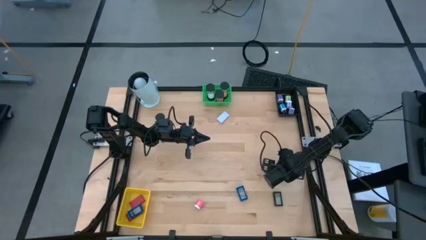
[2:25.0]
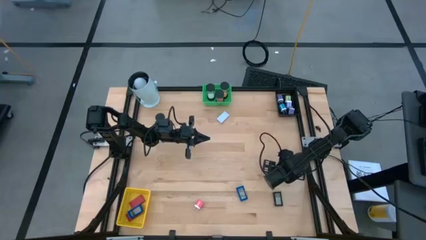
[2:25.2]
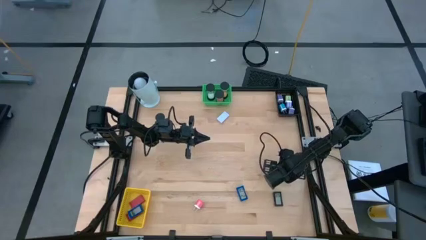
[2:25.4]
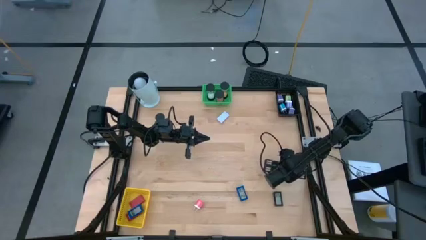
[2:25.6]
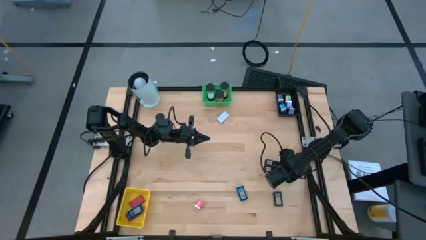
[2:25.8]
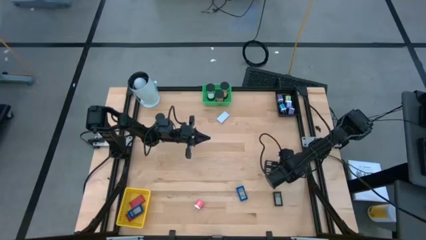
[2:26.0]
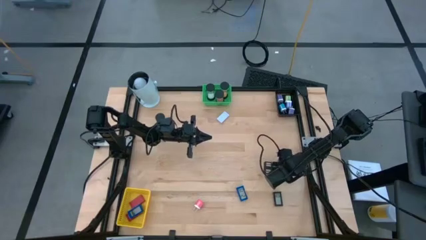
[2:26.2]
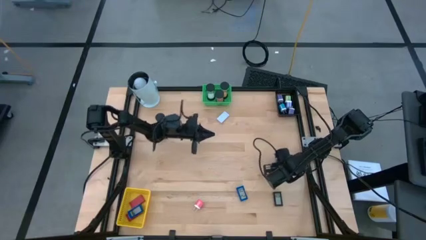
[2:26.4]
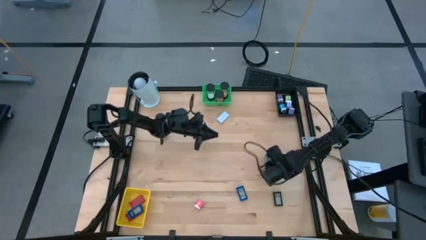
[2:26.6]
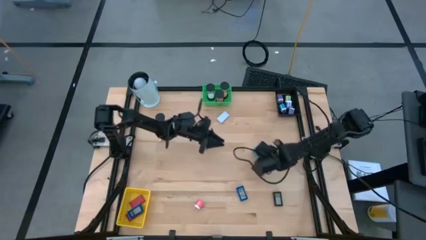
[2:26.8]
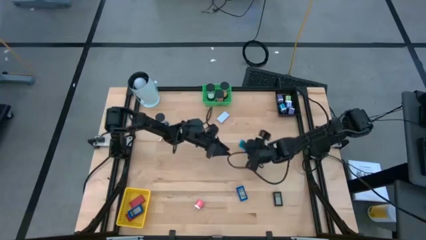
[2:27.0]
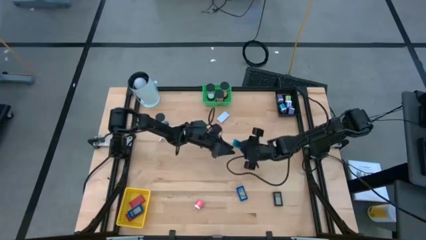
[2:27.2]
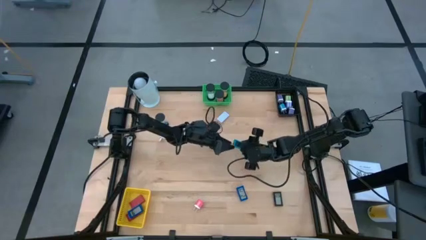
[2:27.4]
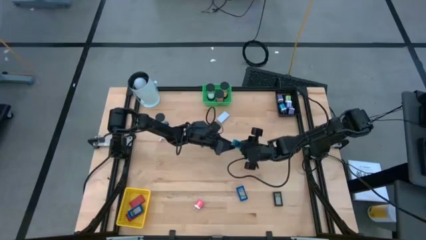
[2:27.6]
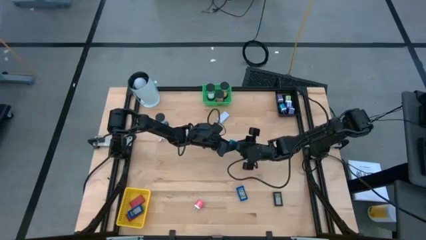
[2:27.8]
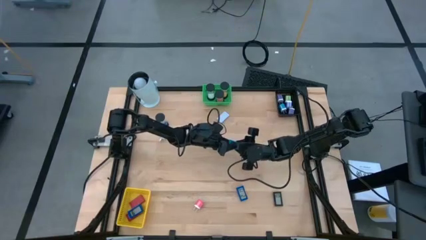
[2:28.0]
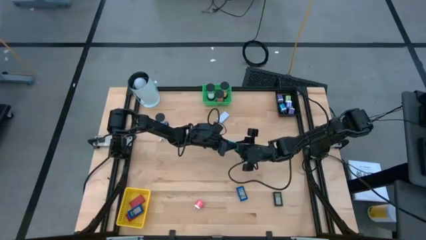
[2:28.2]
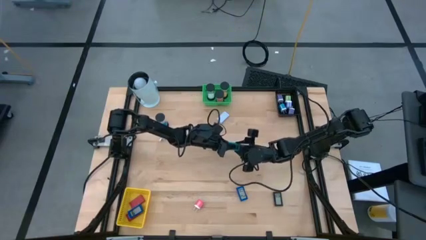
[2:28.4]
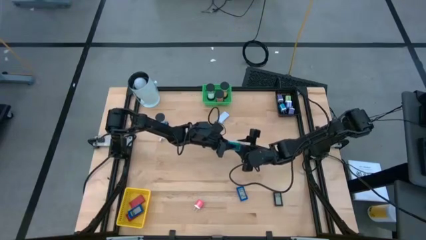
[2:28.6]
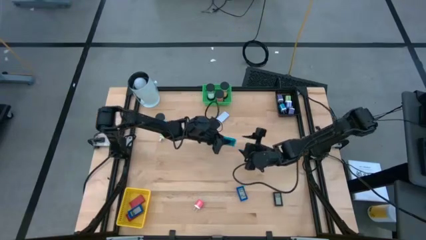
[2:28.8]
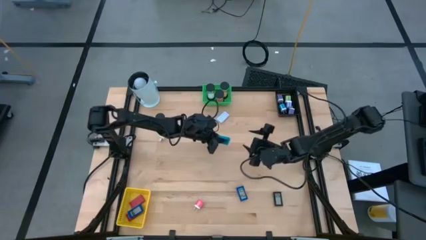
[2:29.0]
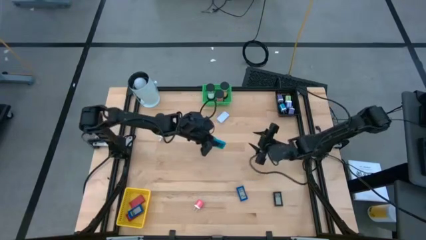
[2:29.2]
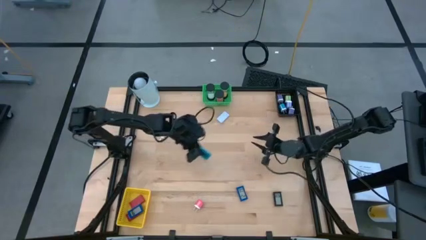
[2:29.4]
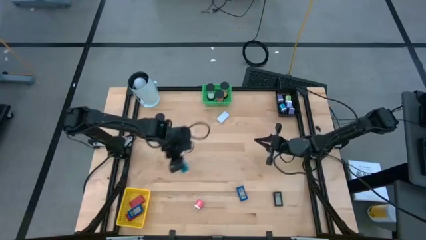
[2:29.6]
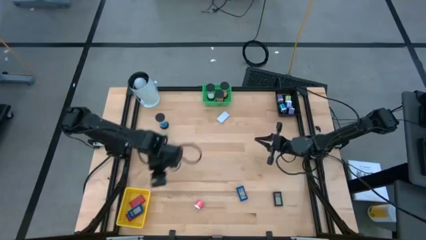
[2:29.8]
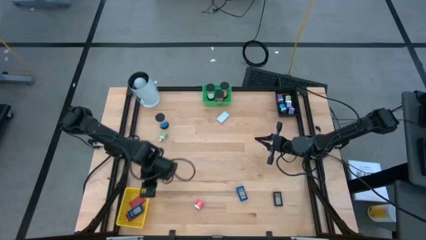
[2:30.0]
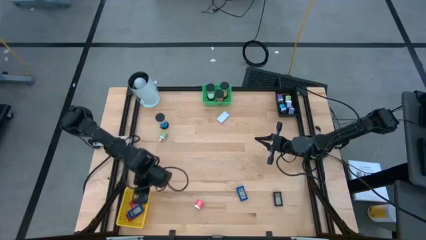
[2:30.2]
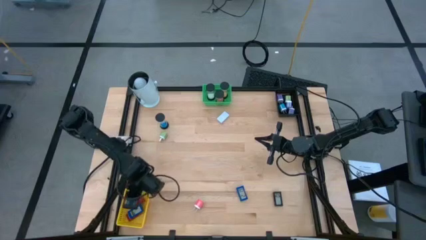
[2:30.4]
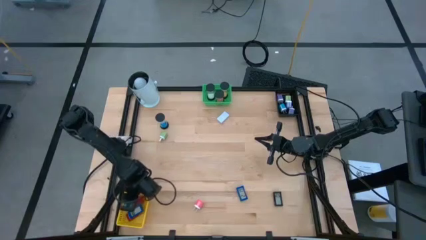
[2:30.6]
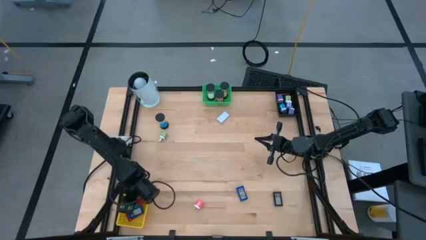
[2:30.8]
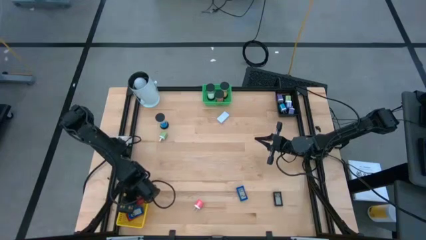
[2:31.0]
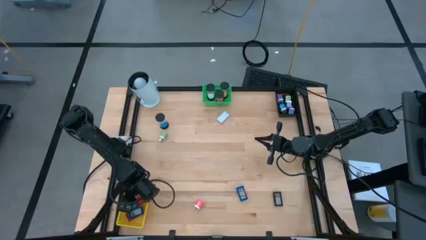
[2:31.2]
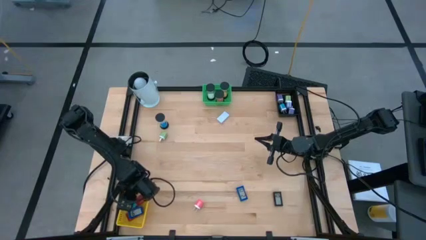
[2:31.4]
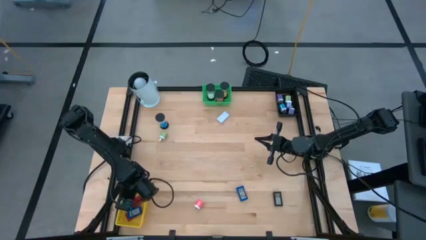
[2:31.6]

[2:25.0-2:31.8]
Task: Pick & Place Office items
Put the light blue timer into the yellow basket

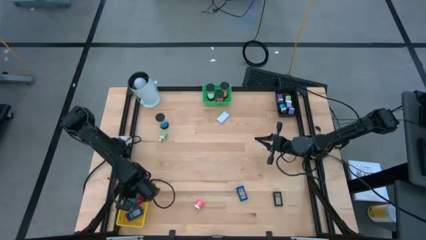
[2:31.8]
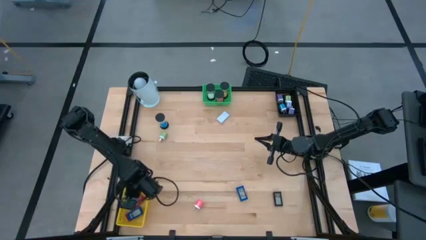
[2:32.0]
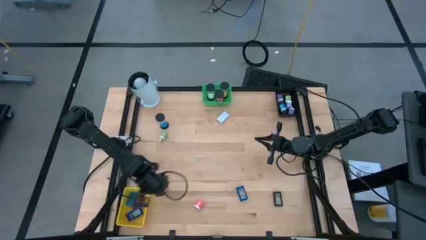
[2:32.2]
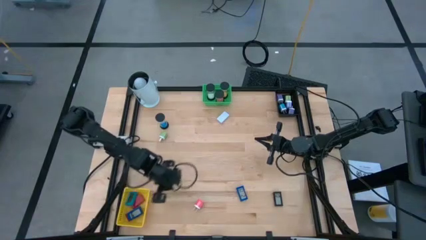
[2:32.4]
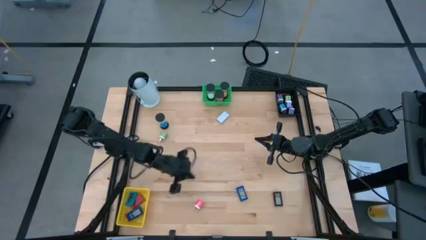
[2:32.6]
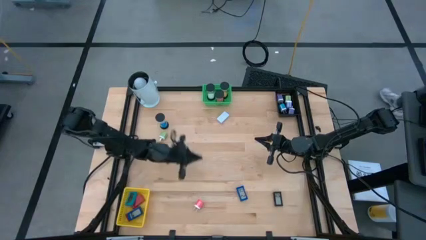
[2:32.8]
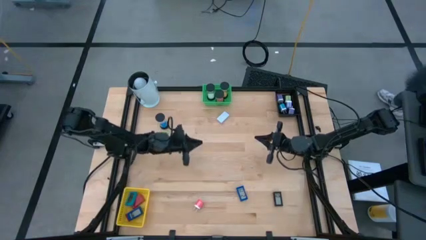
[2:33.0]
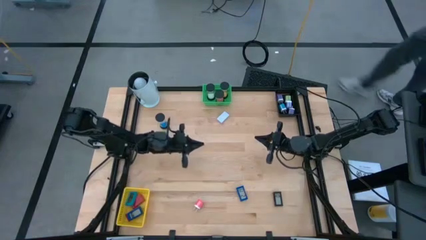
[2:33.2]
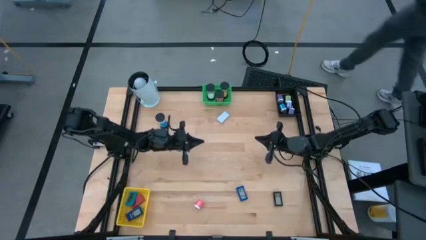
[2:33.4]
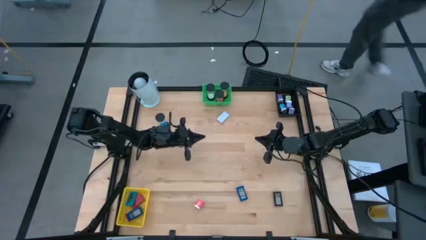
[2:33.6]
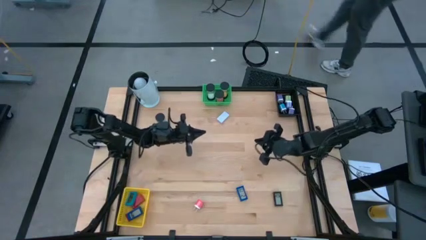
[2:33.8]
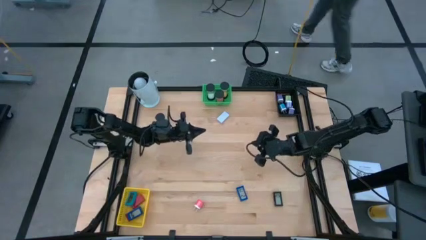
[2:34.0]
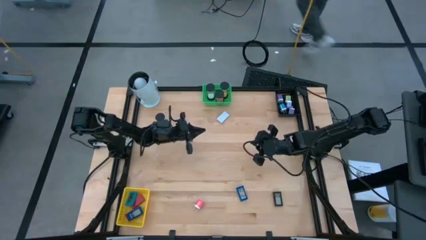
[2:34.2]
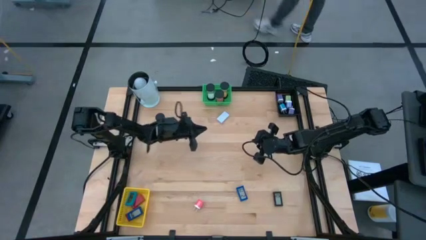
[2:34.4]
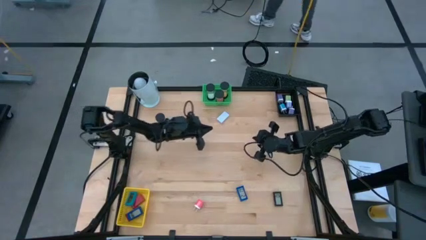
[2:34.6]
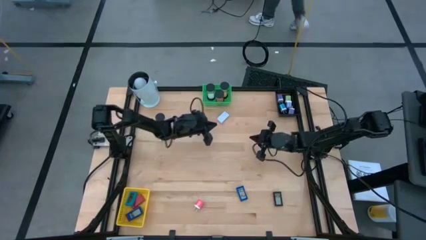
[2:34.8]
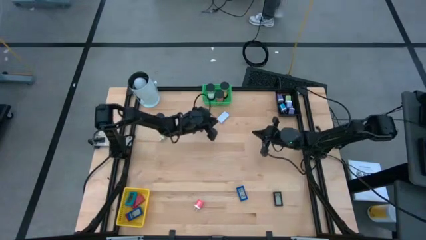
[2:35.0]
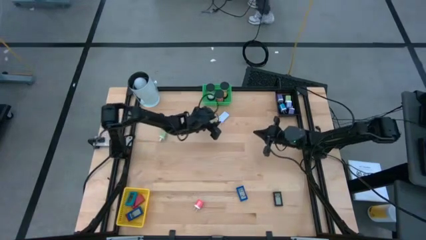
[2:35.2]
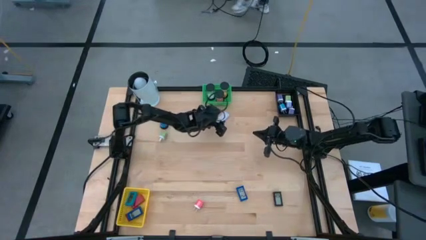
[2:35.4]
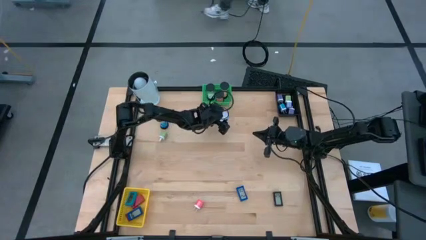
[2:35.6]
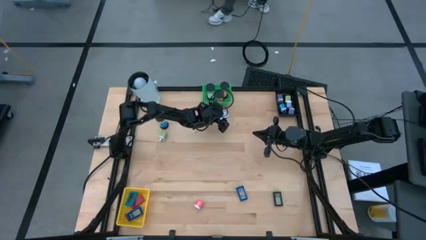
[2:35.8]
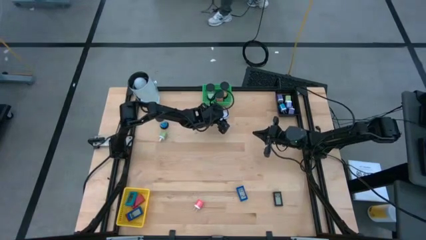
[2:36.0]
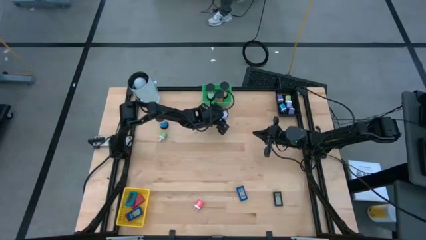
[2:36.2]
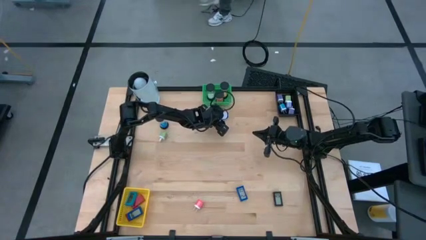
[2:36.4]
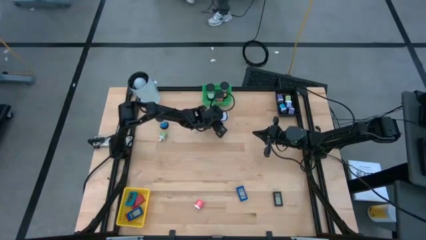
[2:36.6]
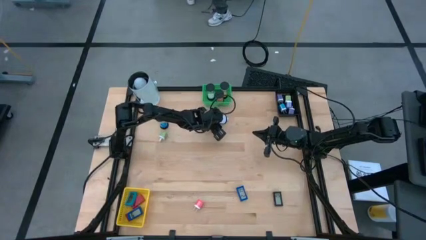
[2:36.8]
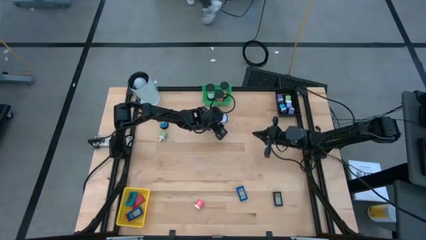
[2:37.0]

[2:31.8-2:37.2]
Put the white timer into the yellow basket

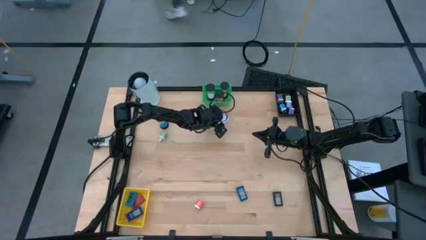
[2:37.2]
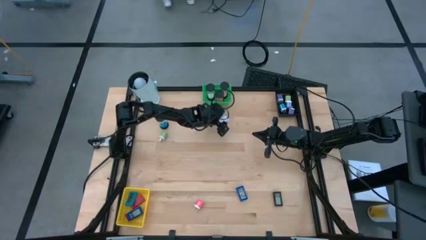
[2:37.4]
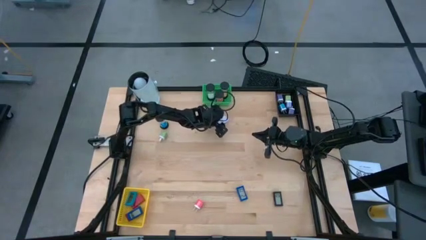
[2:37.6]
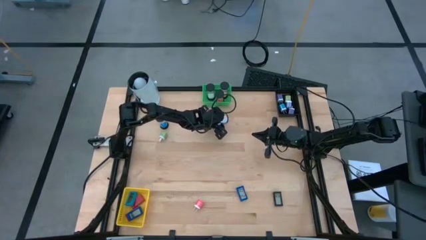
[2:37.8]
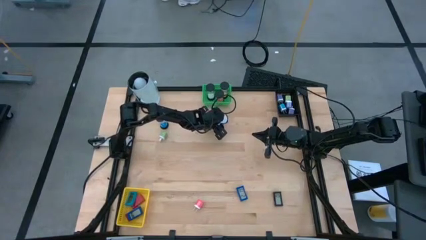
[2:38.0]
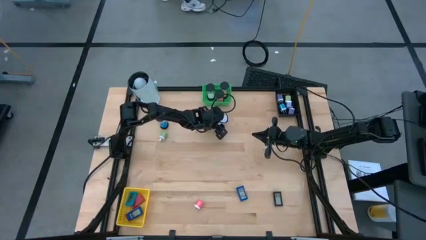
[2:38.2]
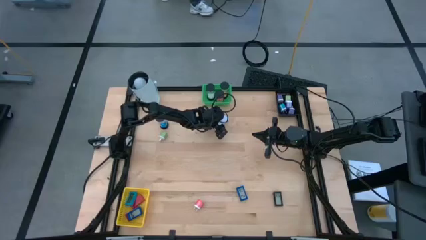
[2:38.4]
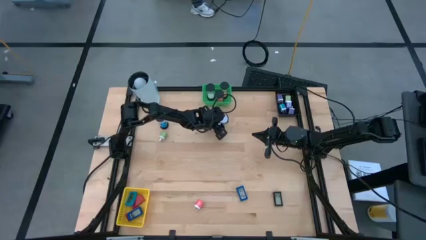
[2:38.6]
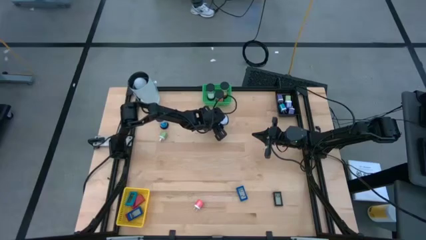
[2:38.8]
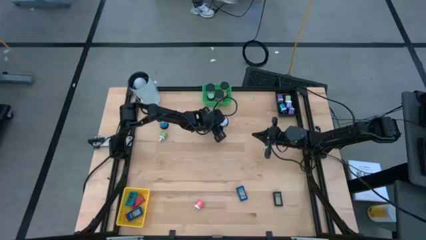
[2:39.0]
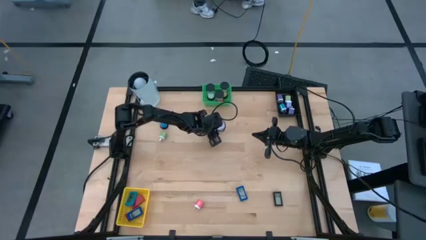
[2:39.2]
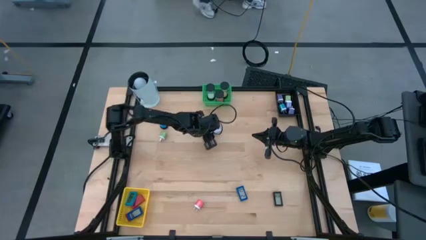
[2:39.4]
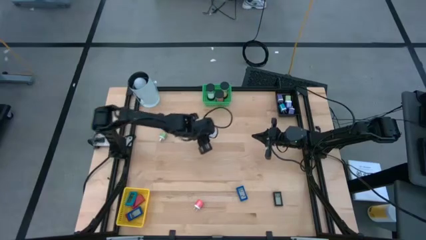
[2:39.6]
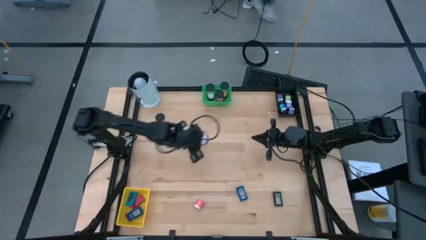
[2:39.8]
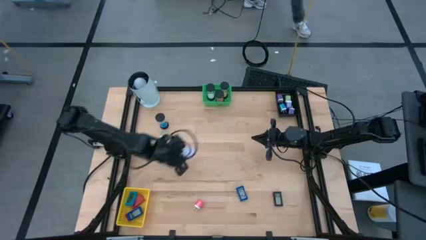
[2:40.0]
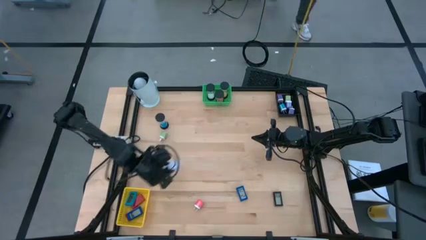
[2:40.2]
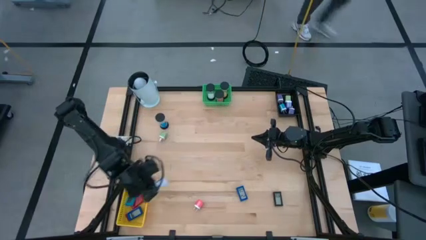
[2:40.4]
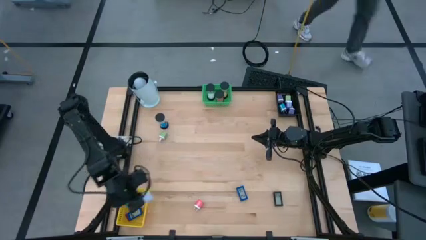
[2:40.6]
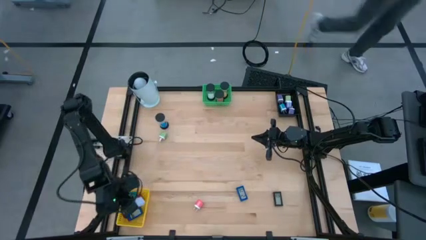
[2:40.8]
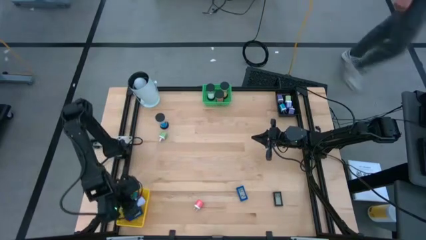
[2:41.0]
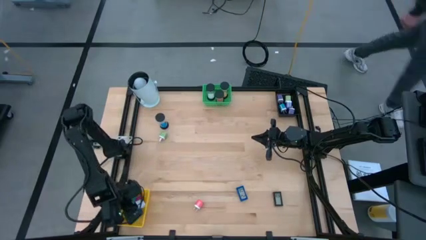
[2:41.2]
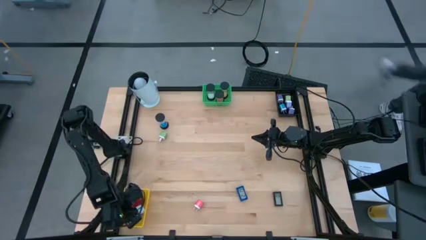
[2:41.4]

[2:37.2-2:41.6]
Put the white timer into the yellow basket
